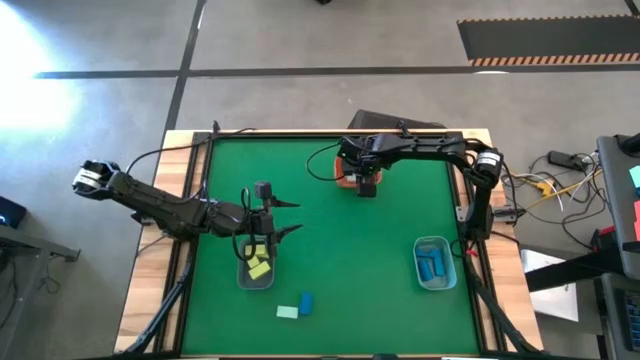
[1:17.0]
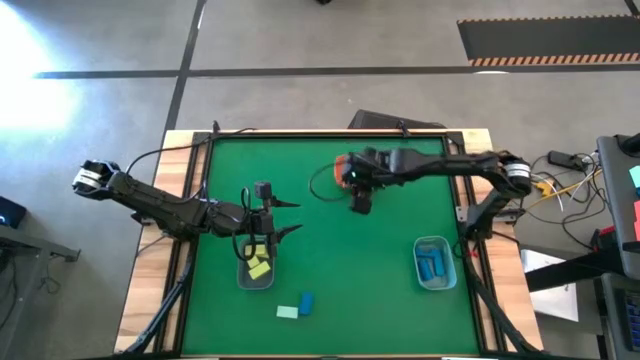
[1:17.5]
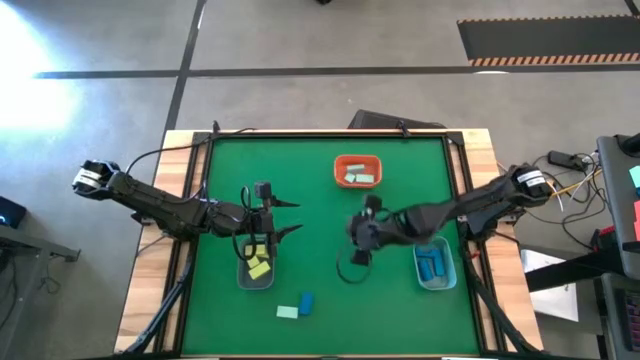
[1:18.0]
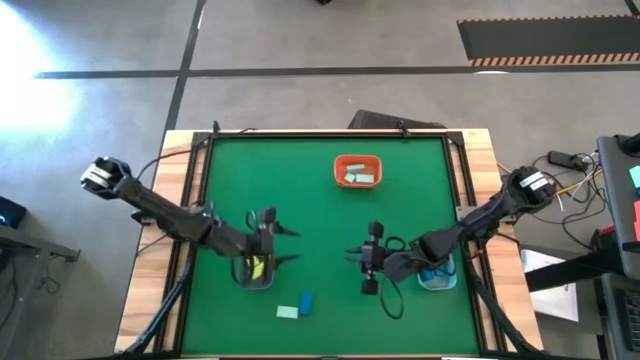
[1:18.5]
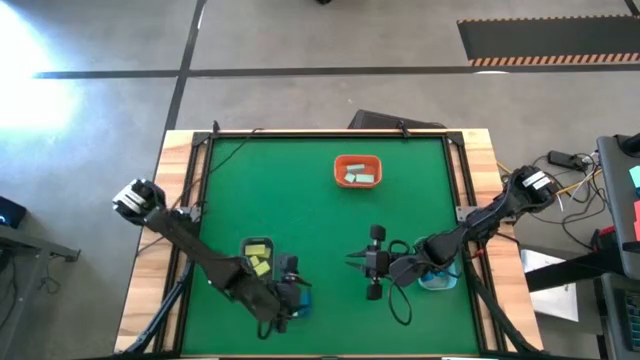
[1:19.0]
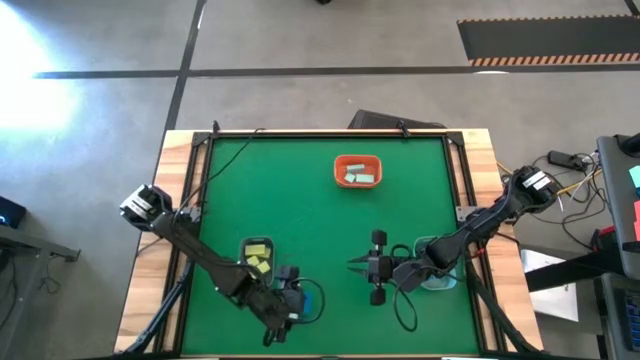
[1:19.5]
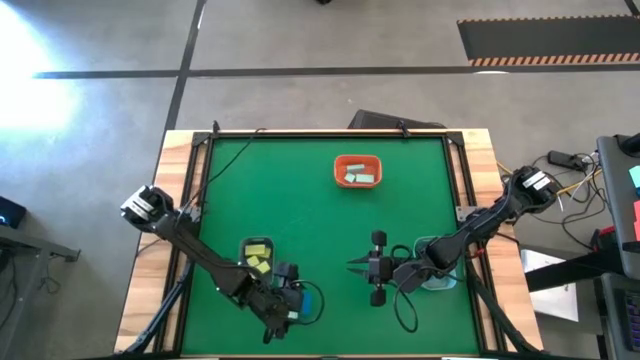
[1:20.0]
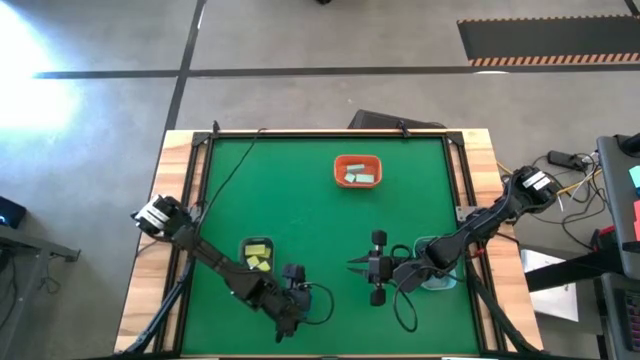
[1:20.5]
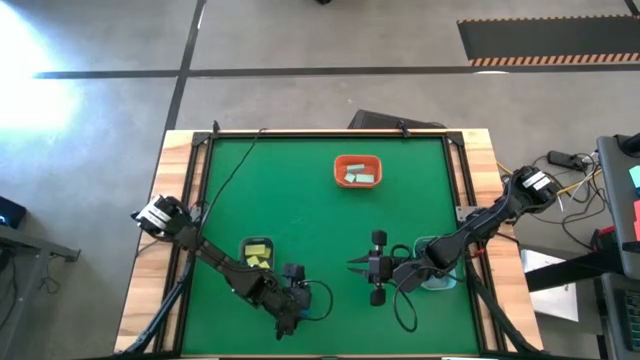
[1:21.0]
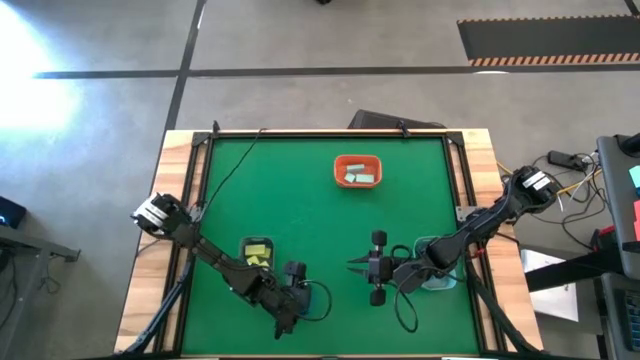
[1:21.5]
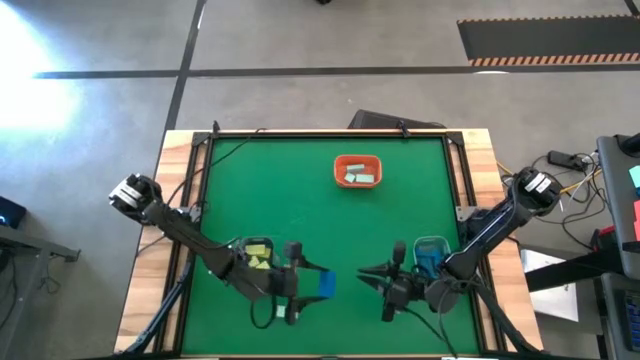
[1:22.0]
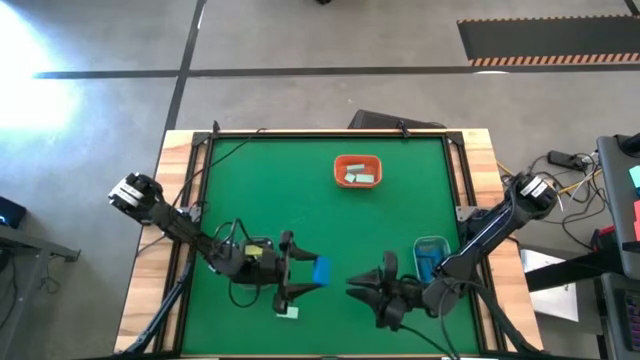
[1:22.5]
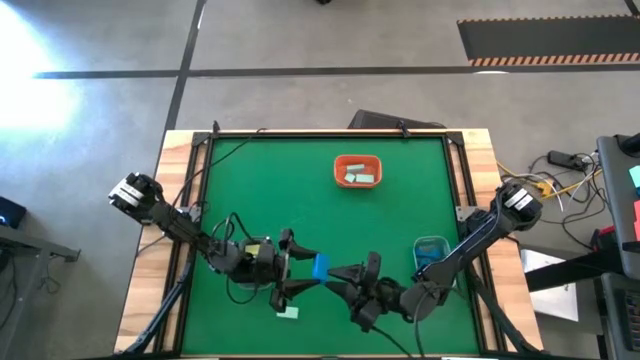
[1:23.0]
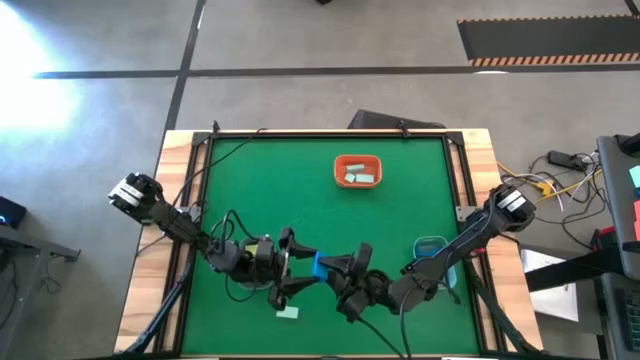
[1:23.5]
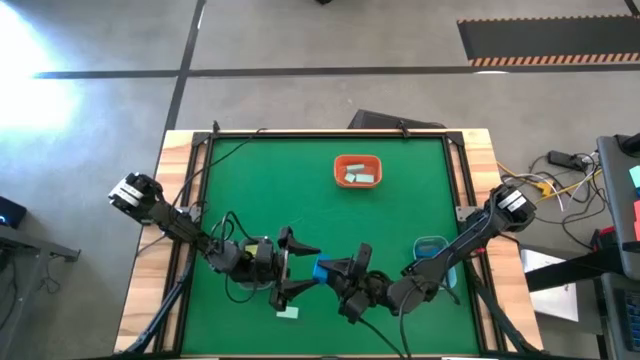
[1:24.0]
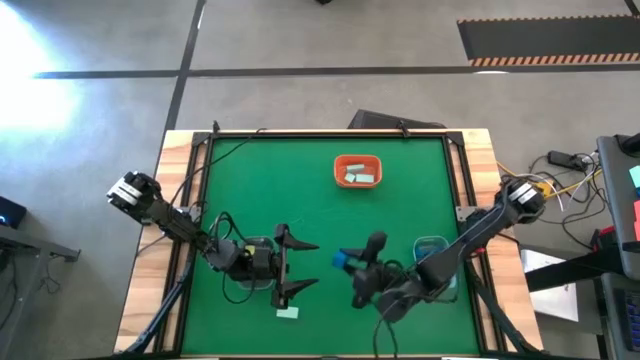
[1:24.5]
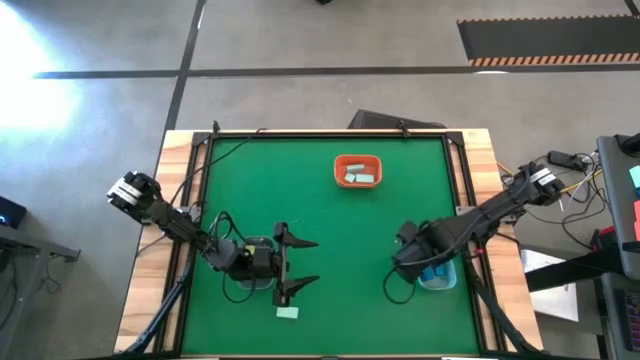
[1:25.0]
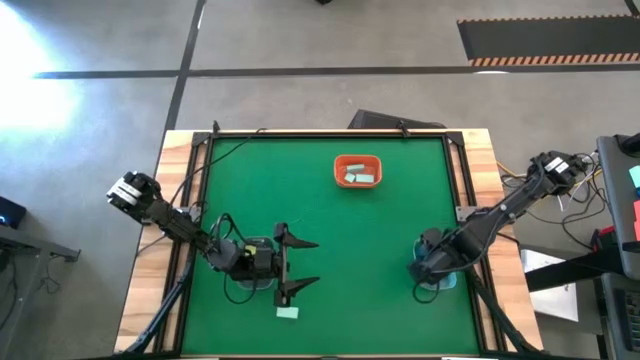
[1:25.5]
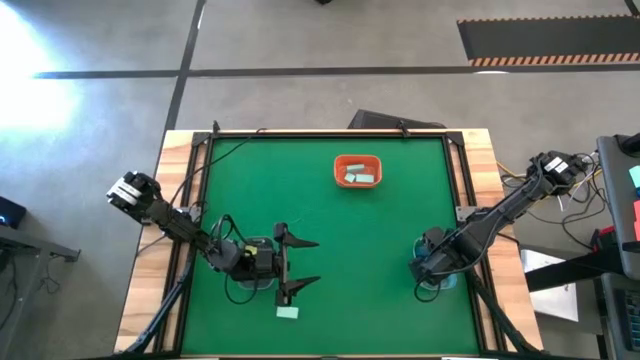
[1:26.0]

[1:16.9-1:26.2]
Task: Sort & place blocks by color
Put the blue block into the light blue bin

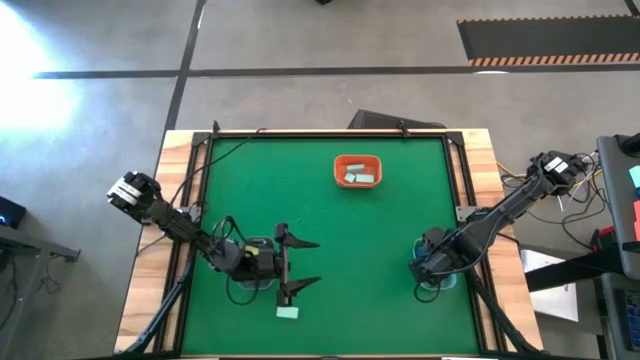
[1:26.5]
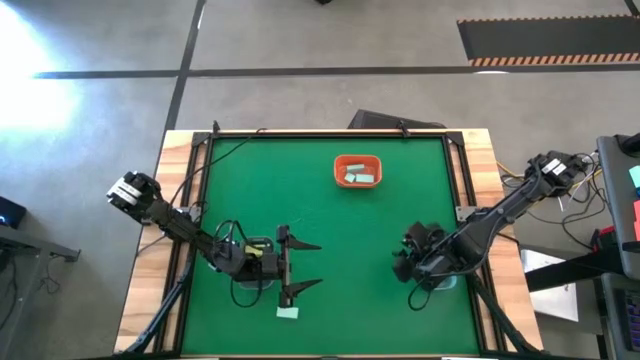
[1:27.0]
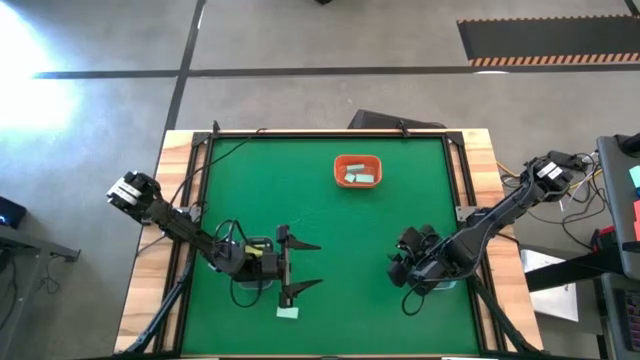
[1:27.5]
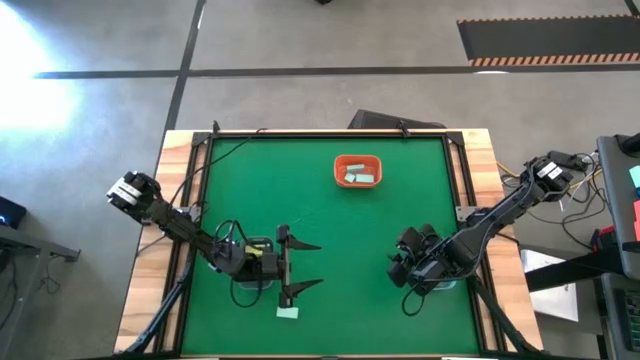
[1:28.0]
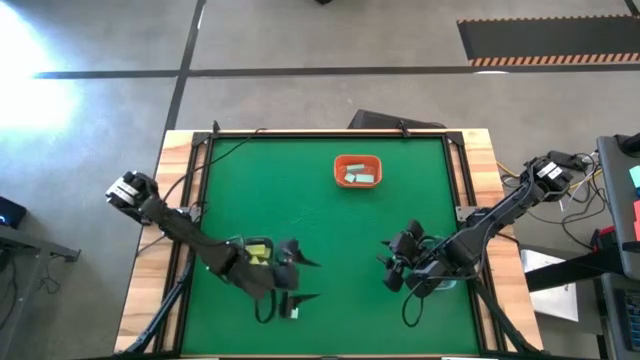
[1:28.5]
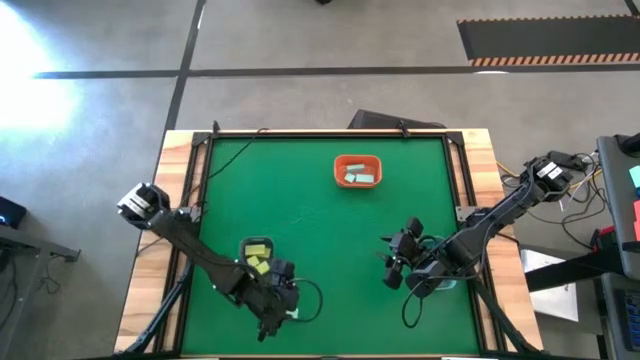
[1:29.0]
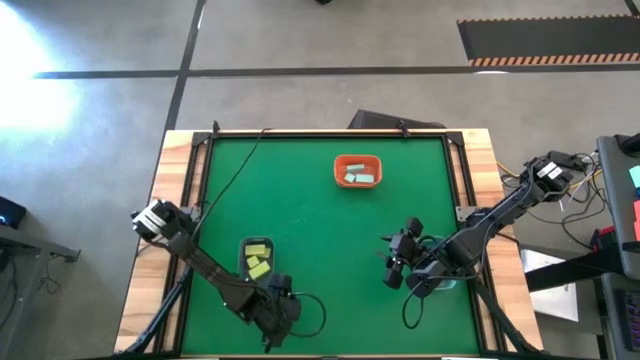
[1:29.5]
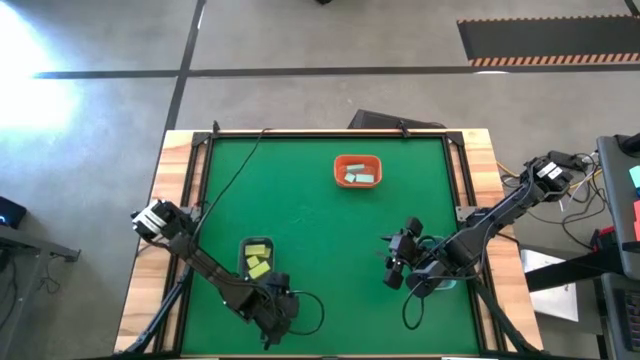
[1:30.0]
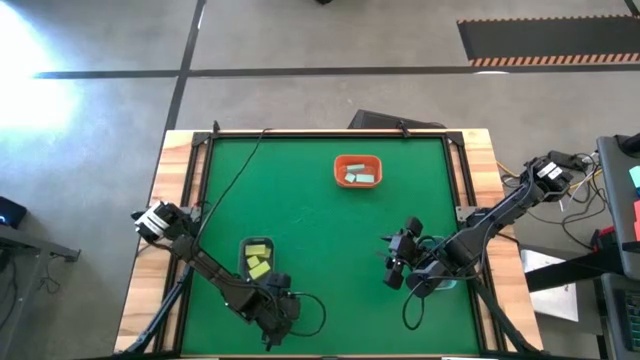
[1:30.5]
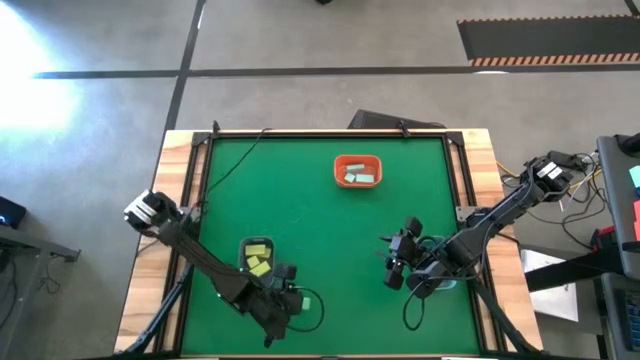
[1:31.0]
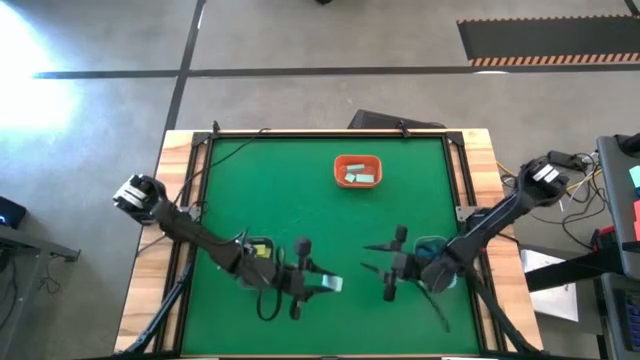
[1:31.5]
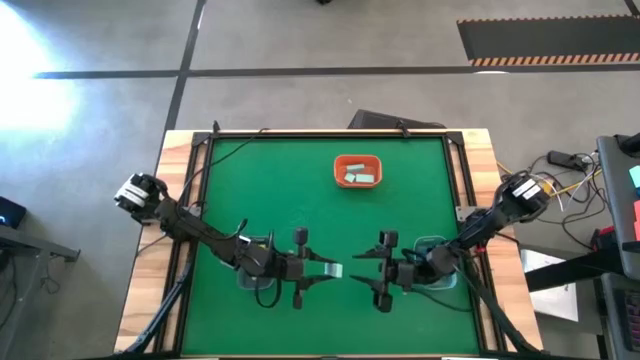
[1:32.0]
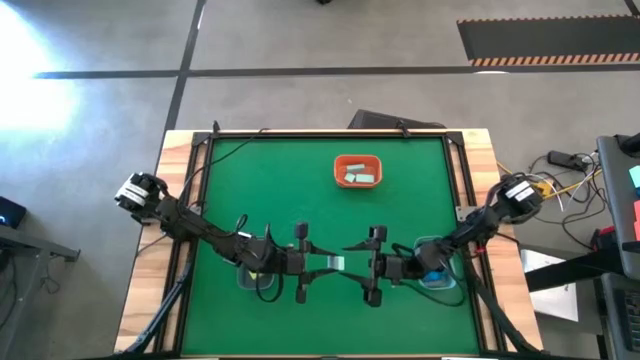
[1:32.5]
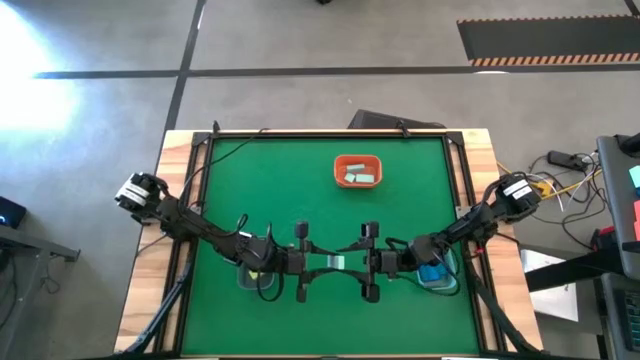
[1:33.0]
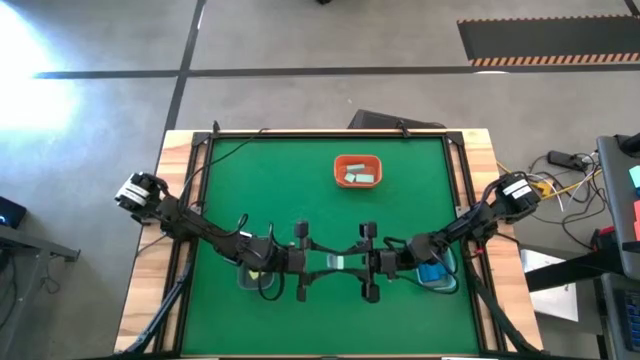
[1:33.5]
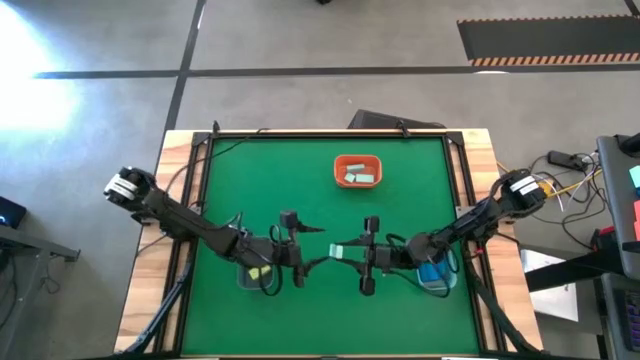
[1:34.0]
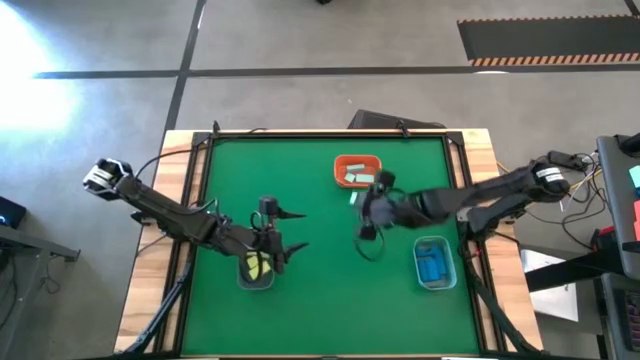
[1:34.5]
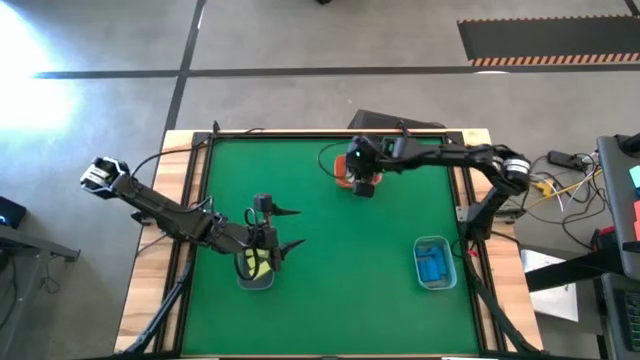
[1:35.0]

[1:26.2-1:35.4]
Put the light blue block into the orange bin

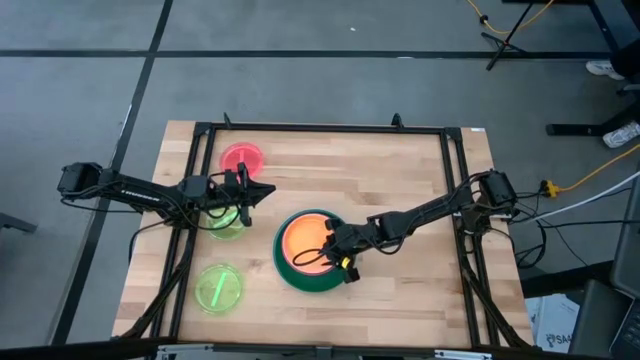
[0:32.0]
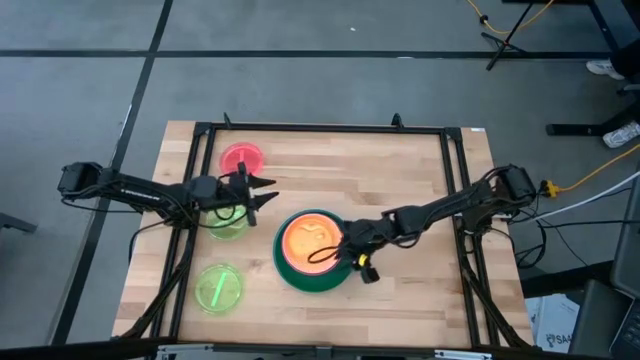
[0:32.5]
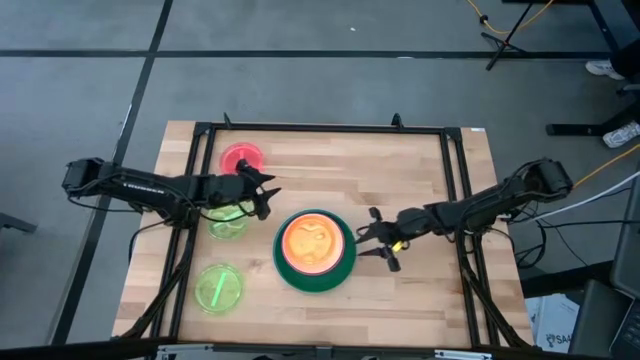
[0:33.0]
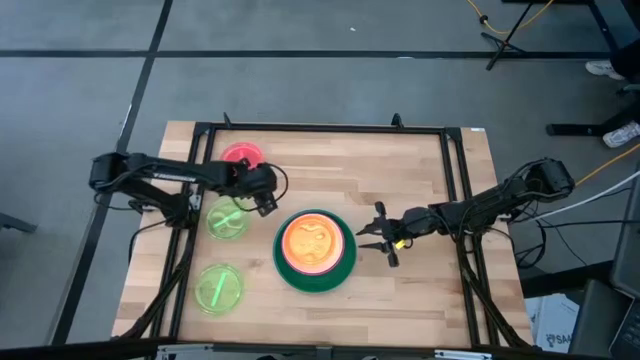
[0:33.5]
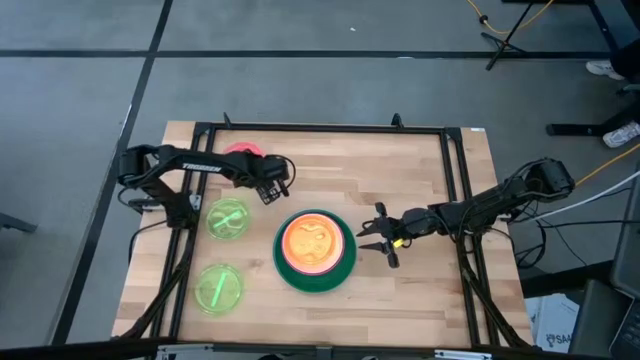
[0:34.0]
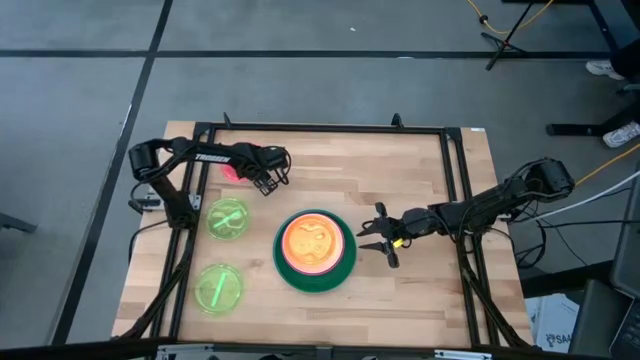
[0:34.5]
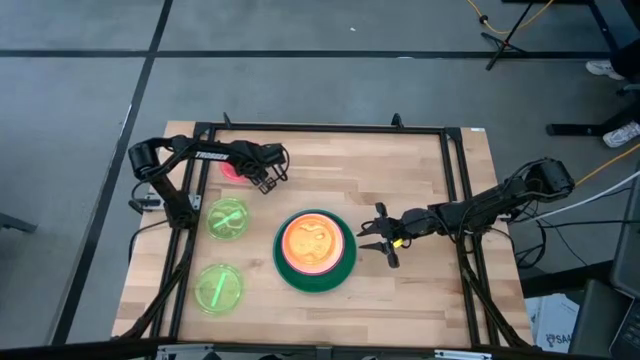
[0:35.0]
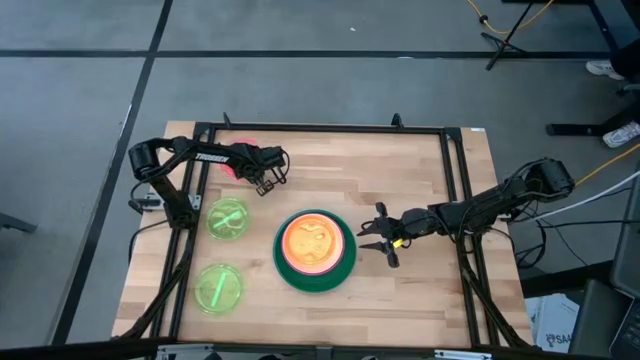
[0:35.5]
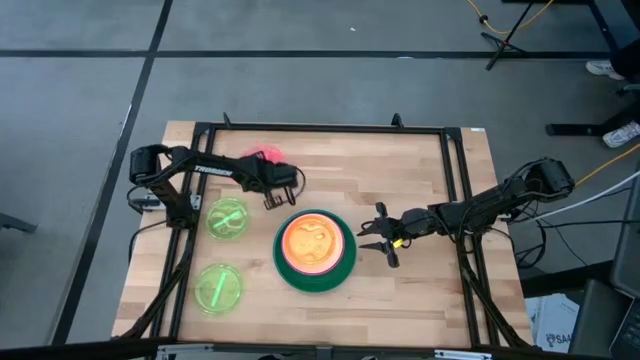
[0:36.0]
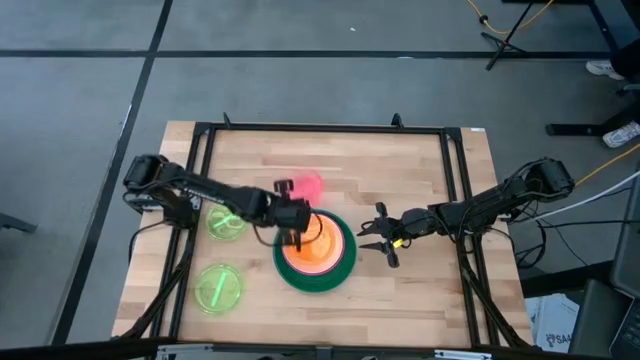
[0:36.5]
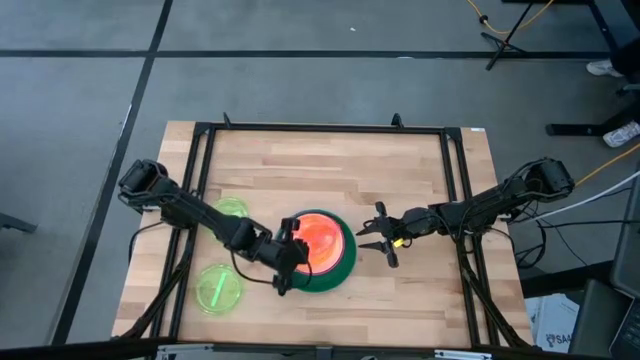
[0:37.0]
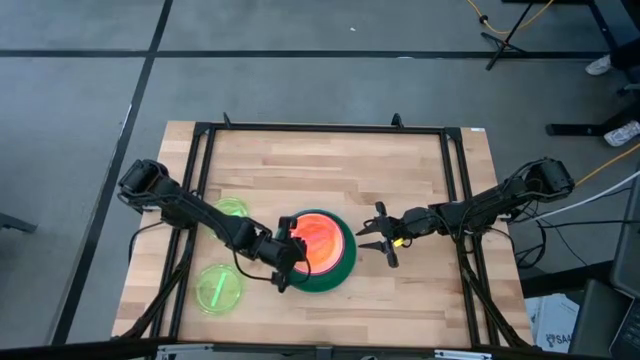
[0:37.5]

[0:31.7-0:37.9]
Task: Stack plastic plates
Stack the transparent pink plate on the stacked plates
